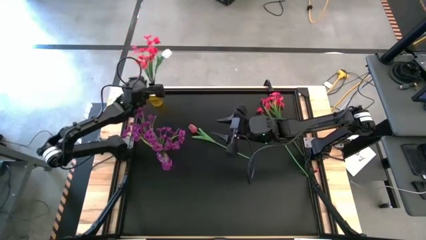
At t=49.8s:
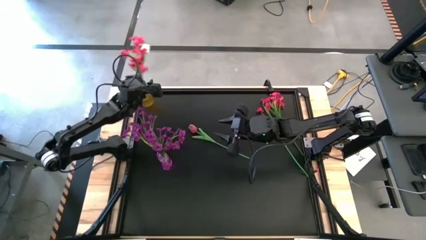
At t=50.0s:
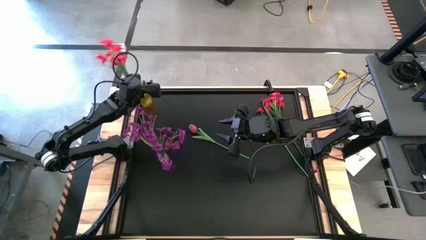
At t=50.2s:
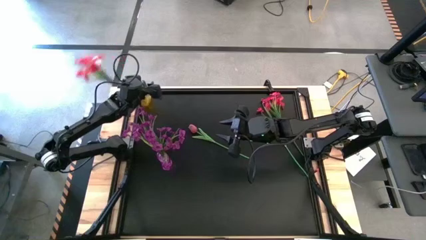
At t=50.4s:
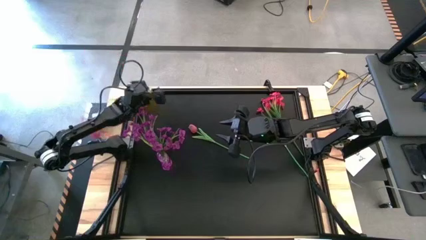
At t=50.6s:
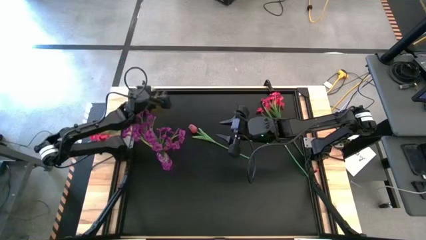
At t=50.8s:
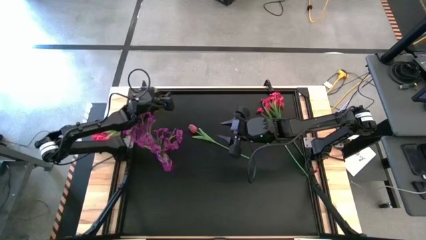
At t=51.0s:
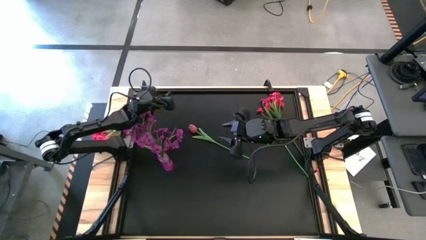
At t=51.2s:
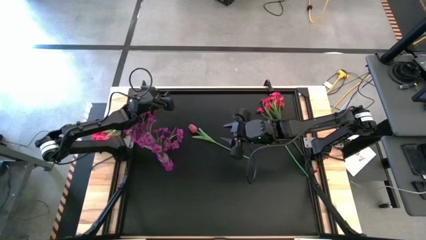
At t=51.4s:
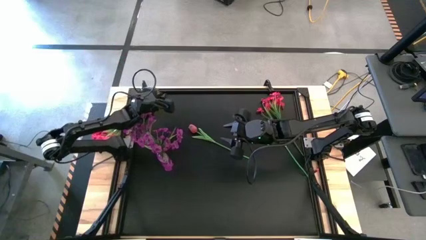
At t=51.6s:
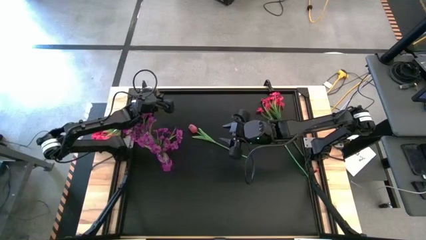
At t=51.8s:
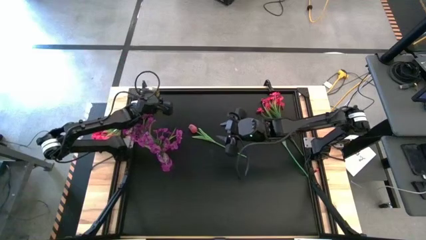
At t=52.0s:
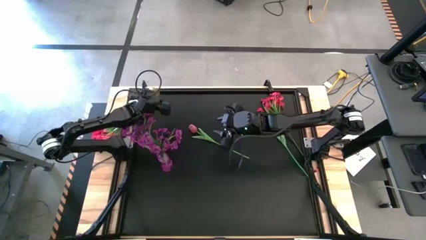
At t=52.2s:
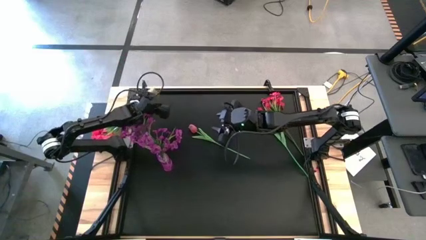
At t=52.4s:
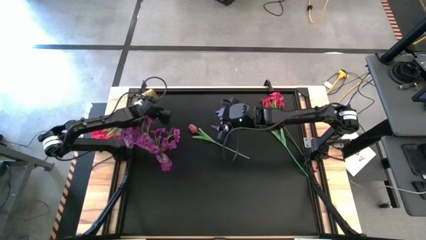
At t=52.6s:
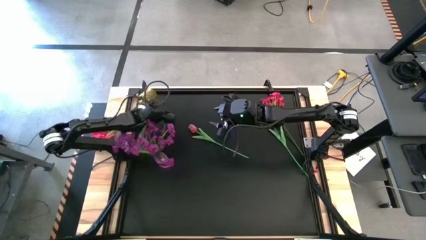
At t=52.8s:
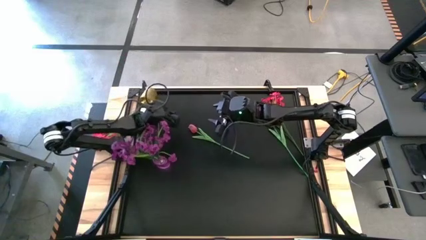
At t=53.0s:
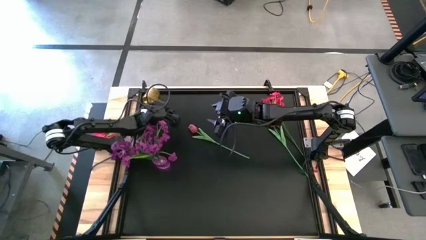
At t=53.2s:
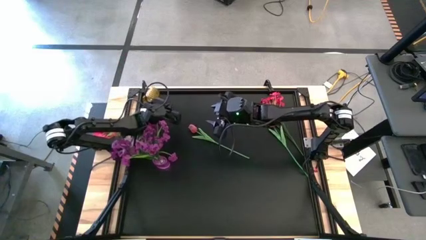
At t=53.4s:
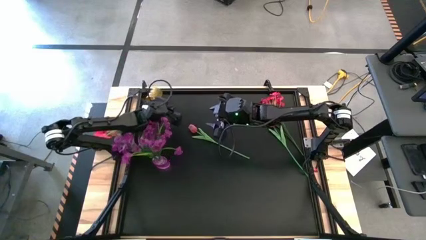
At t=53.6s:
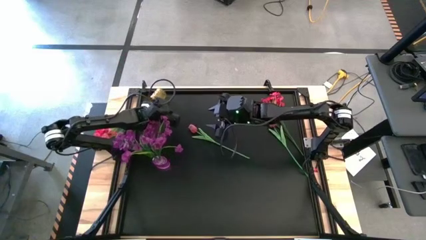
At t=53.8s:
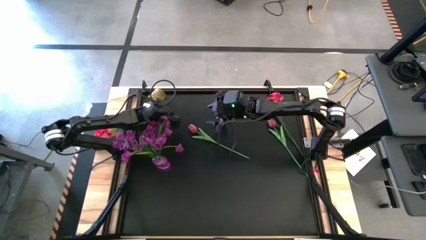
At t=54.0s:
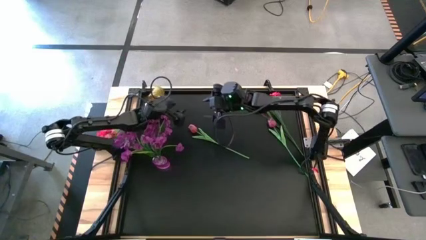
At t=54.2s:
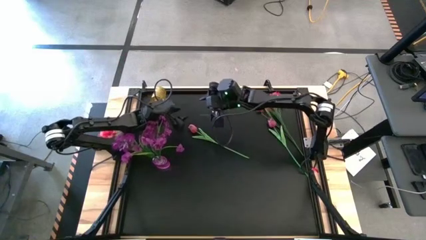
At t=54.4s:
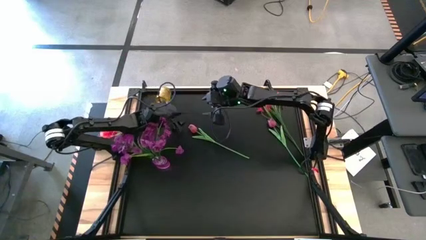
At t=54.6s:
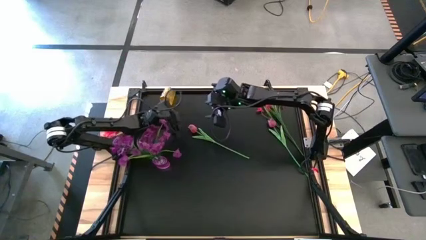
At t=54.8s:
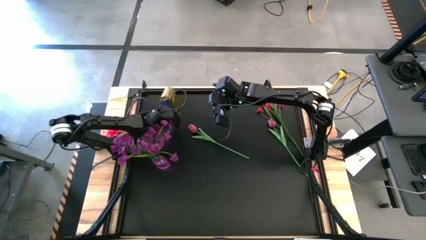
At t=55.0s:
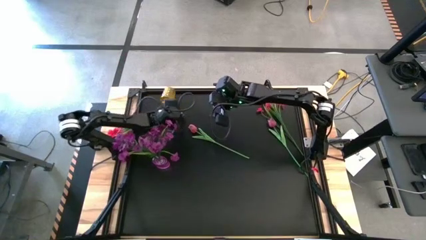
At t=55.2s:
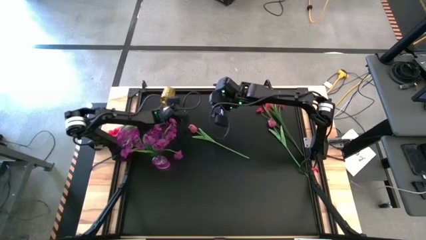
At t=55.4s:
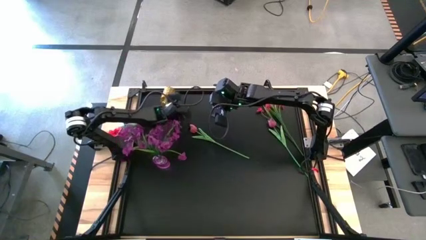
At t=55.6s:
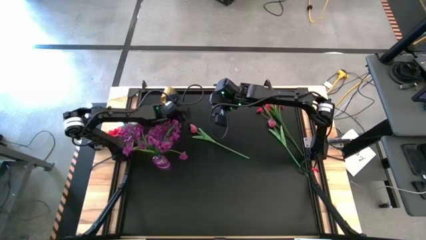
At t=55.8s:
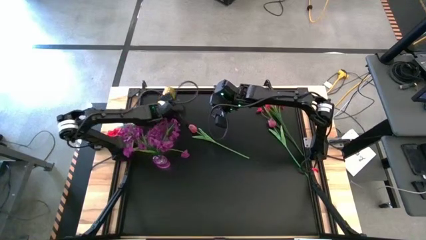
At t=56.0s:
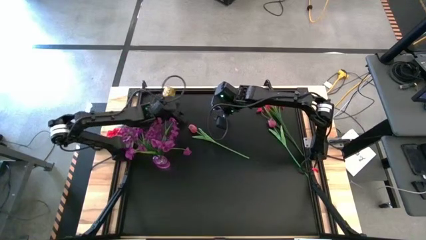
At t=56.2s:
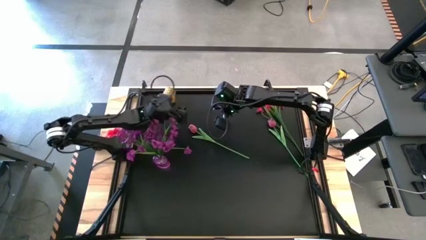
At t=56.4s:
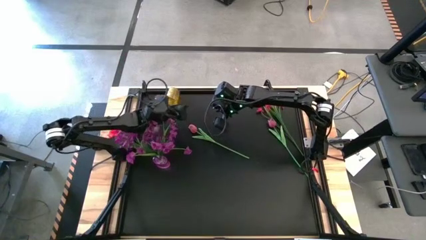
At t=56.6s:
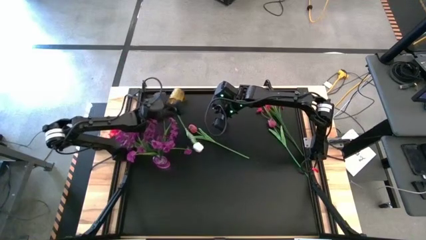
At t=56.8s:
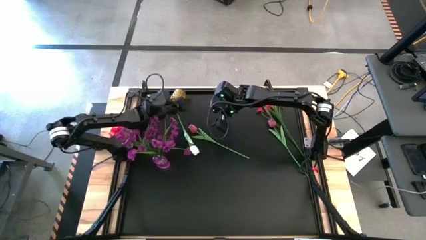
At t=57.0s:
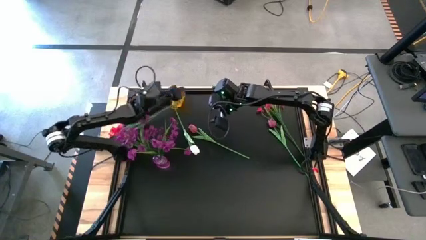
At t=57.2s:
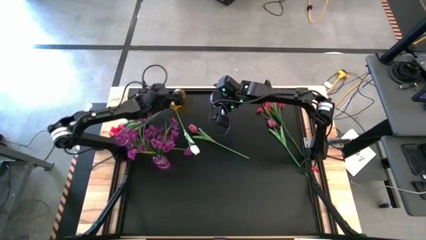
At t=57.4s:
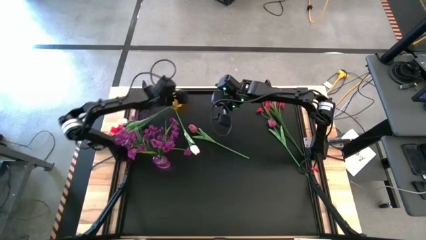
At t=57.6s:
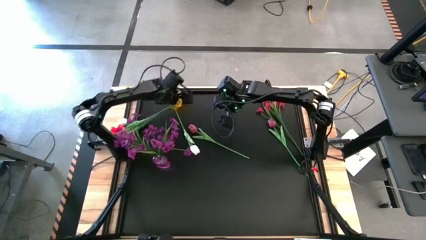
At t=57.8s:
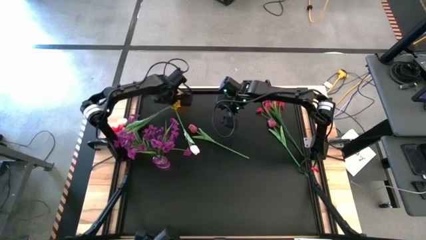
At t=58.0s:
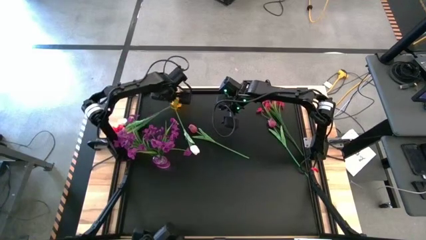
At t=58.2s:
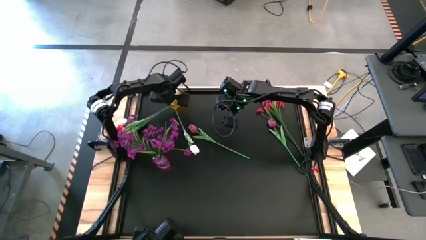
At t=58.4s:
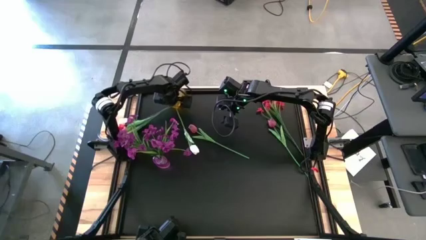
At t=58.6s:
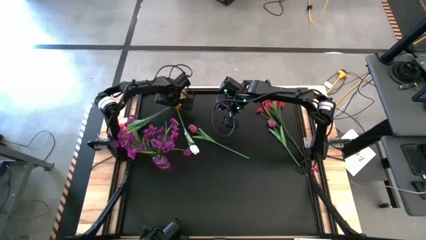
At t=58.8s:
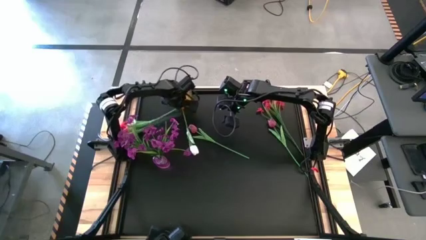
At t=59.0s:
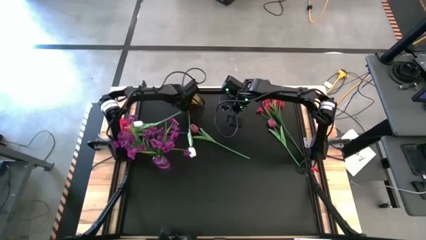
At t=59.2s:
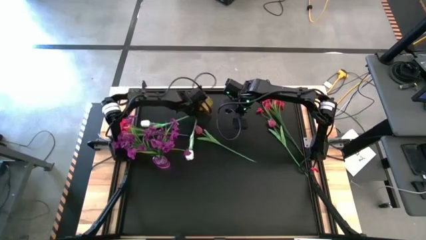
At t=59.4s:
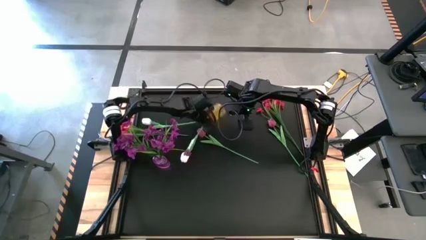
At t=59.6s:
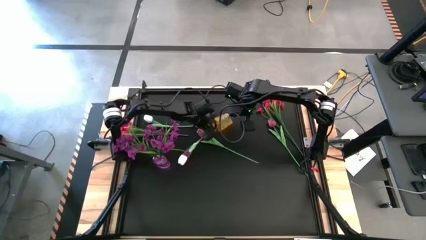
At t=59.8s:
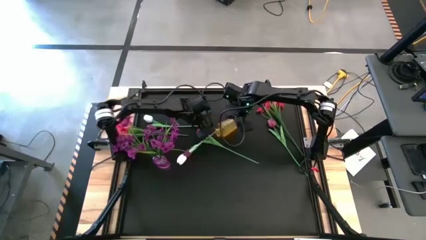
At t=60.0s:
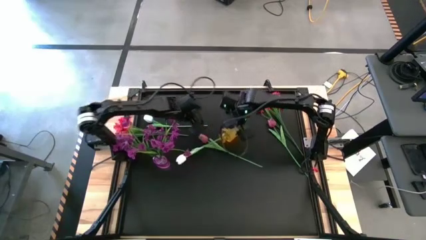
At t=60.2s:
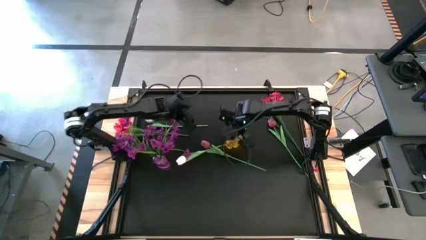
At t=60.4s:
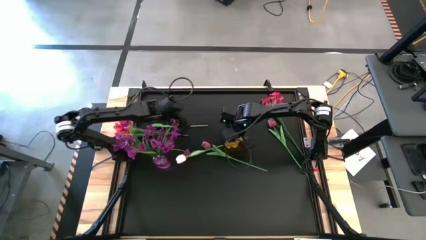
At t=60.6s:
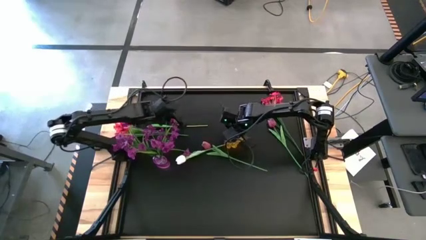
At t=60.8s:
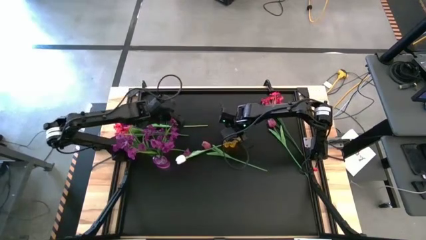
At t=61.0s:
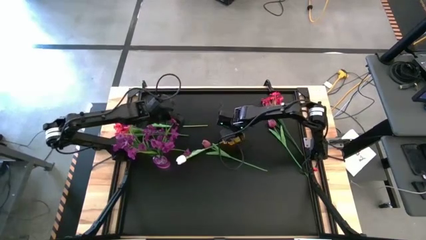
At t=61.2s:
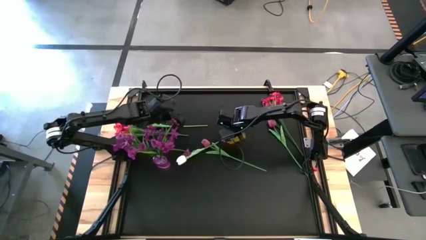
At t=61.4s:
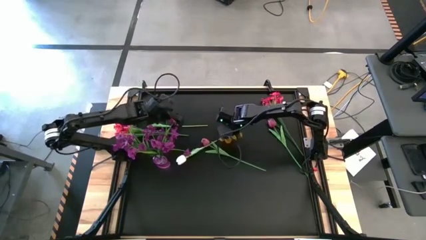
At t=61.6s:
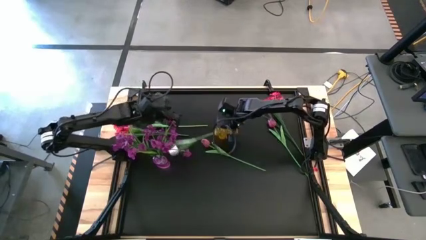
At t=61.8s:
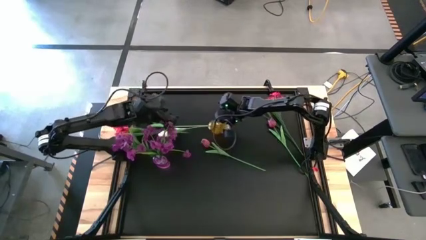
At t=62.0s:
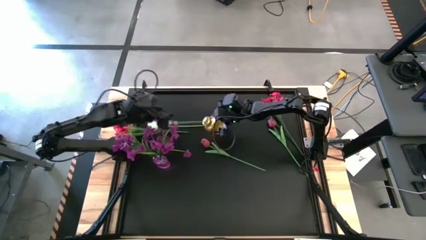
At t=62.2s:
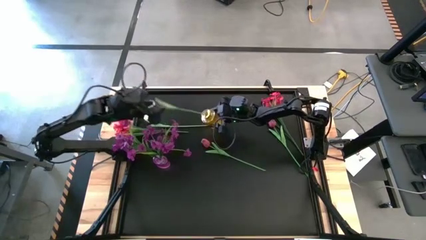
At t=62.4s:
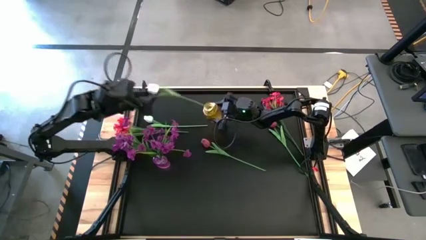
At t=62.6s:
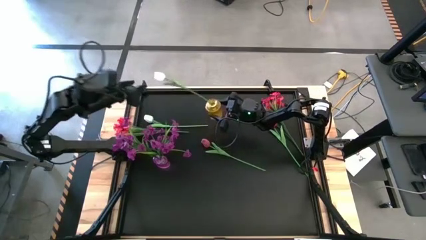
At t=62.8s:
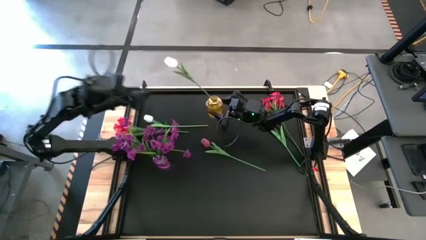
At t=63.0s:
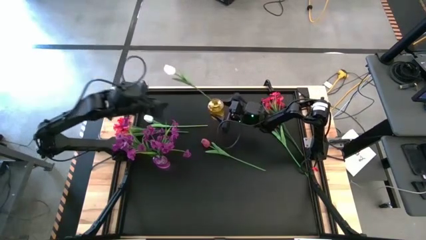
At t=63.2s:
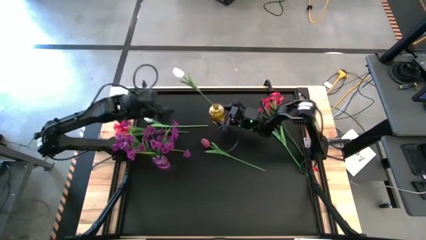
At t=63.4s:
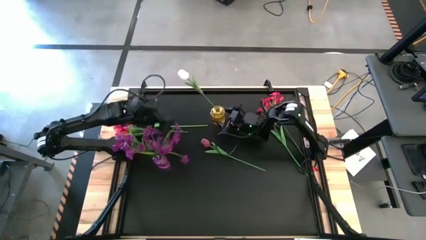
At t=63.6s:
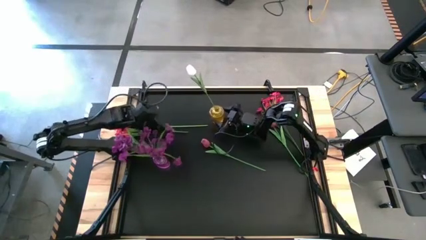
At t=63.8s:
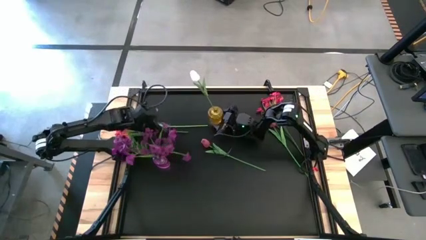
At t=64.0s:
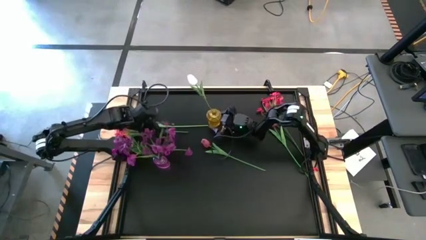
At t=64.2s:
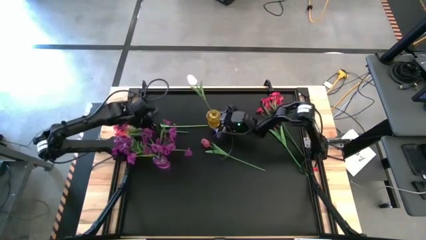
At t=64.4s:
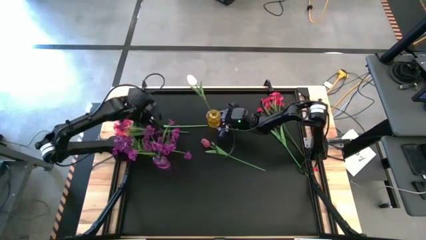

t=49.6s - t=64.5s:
Task: Sort flowers into vase by color
Adjust the yellow vase on the table
